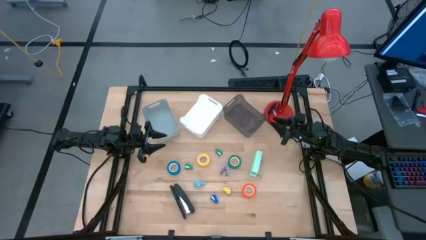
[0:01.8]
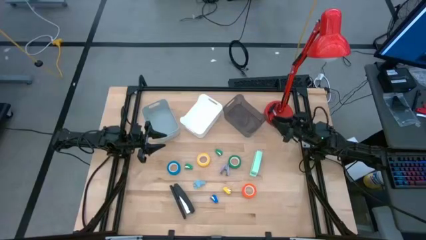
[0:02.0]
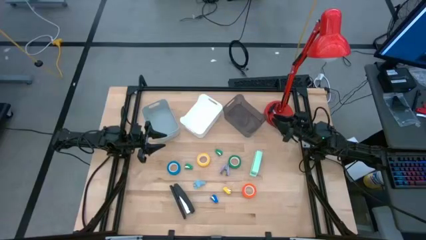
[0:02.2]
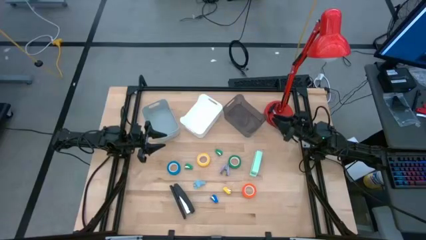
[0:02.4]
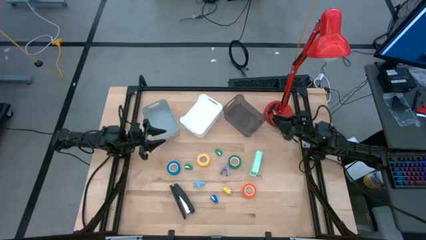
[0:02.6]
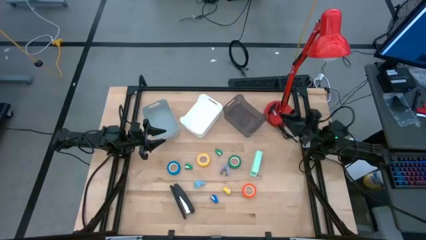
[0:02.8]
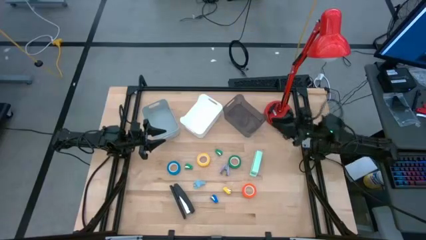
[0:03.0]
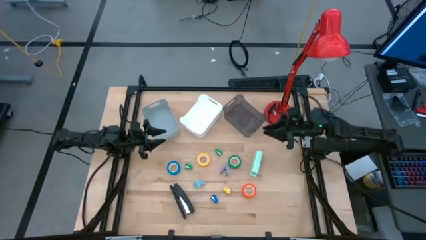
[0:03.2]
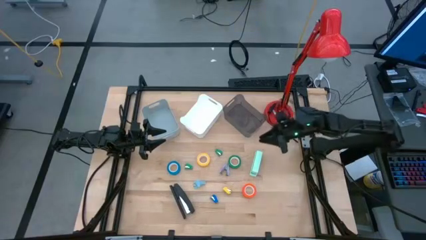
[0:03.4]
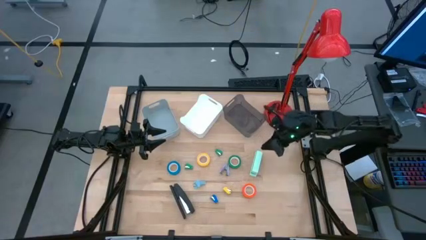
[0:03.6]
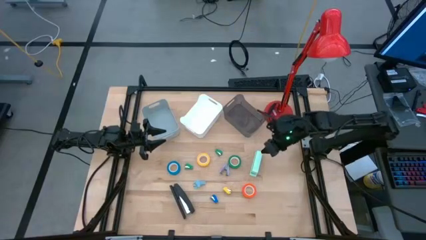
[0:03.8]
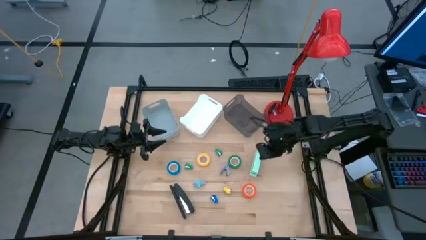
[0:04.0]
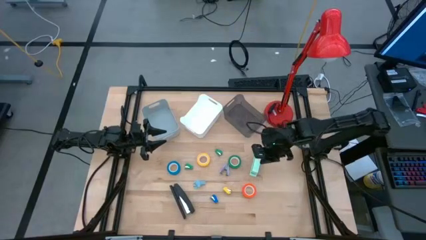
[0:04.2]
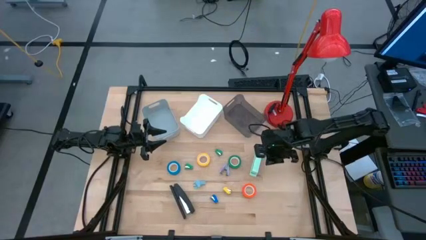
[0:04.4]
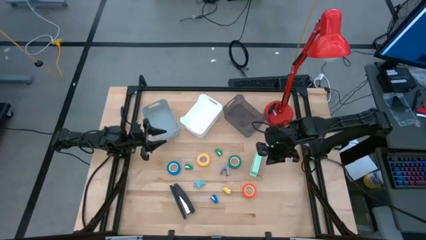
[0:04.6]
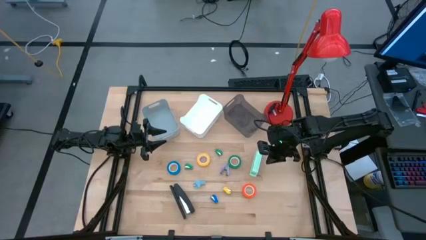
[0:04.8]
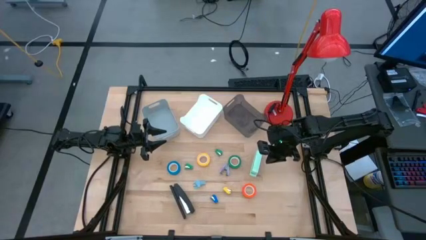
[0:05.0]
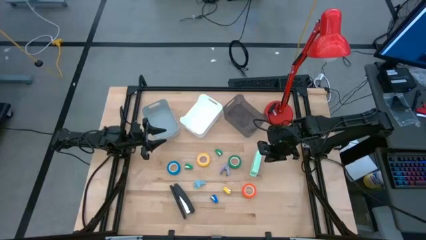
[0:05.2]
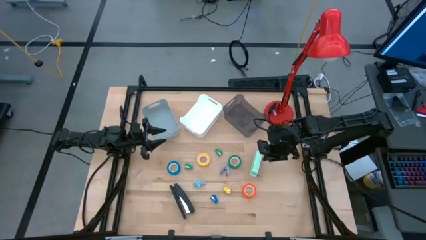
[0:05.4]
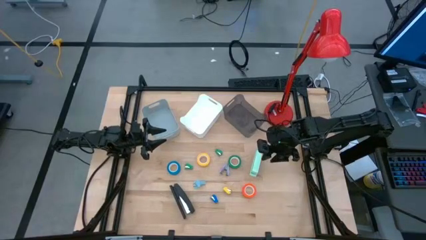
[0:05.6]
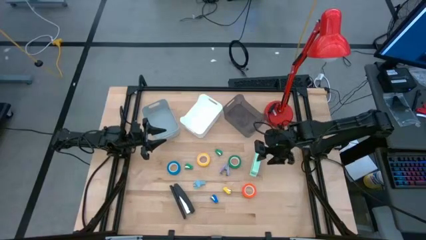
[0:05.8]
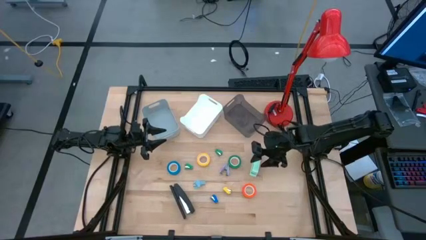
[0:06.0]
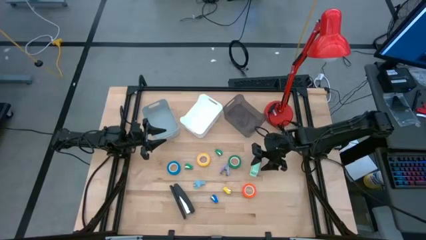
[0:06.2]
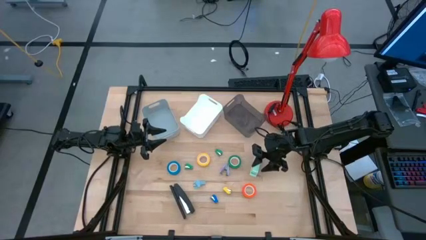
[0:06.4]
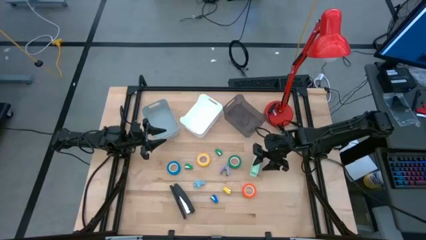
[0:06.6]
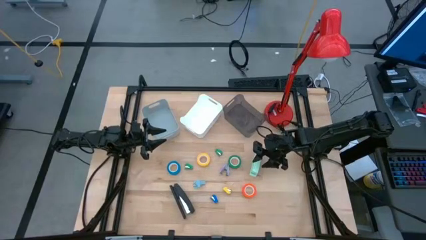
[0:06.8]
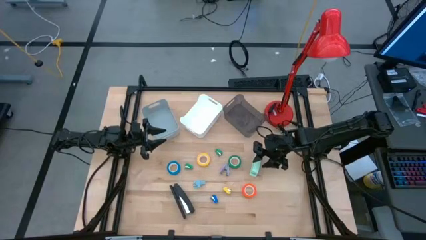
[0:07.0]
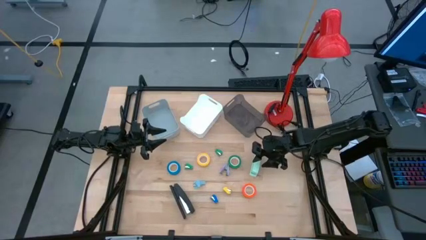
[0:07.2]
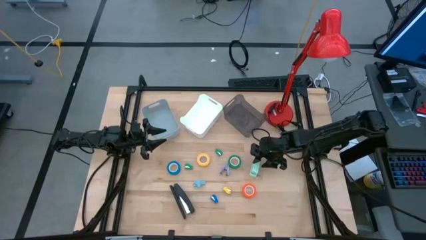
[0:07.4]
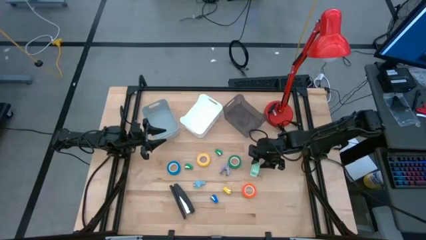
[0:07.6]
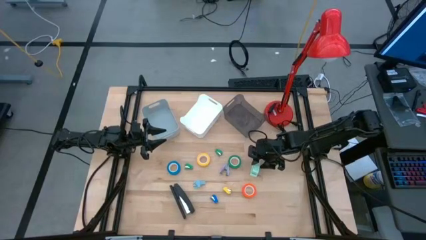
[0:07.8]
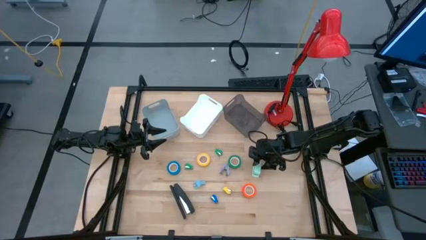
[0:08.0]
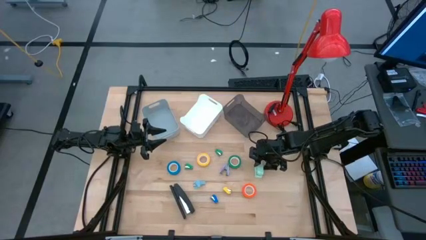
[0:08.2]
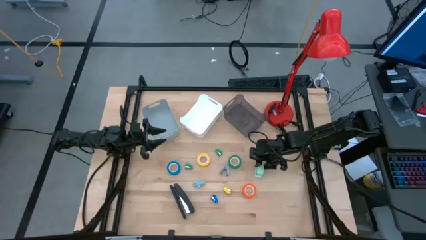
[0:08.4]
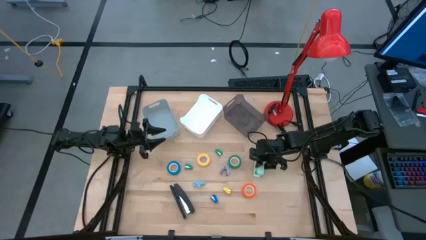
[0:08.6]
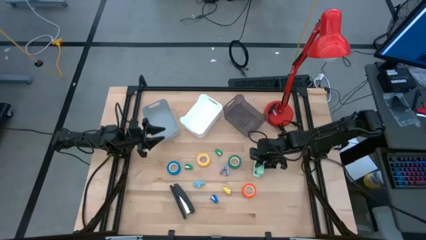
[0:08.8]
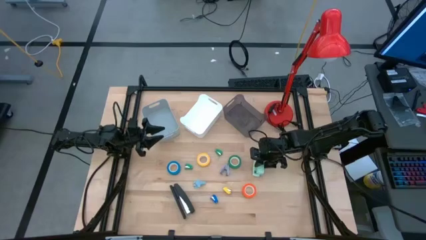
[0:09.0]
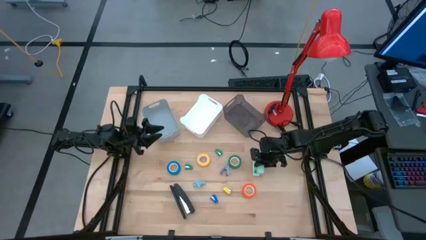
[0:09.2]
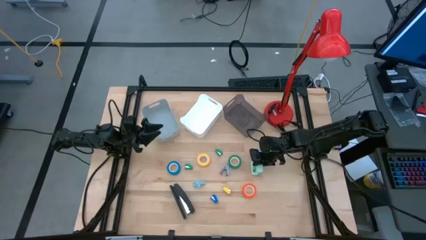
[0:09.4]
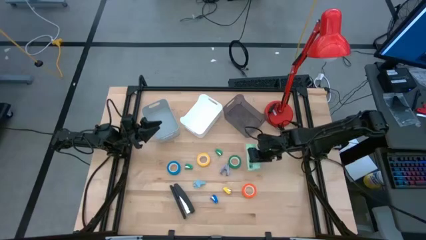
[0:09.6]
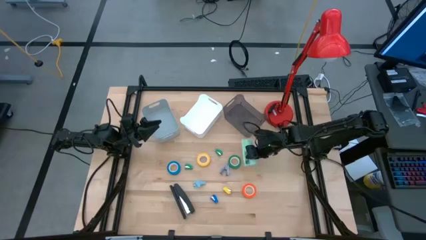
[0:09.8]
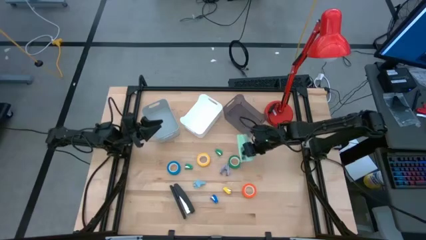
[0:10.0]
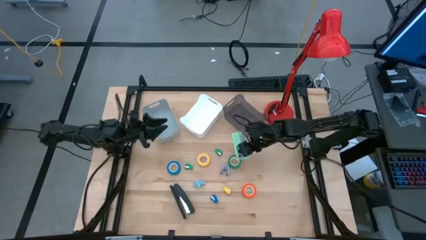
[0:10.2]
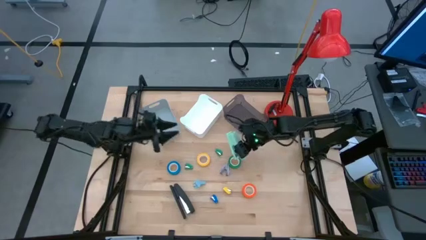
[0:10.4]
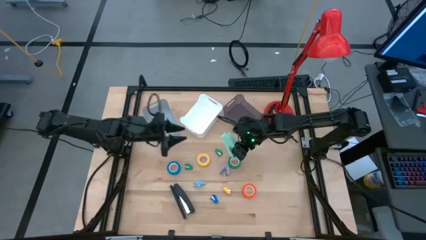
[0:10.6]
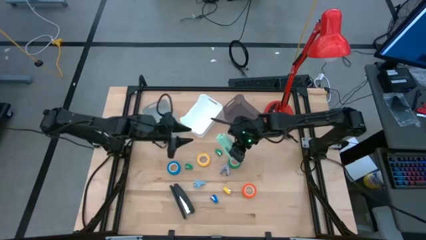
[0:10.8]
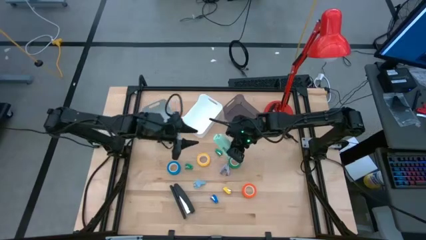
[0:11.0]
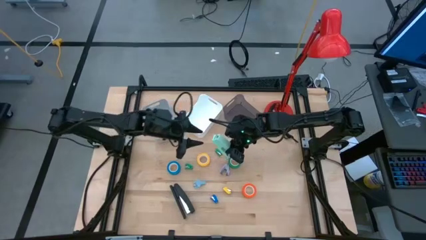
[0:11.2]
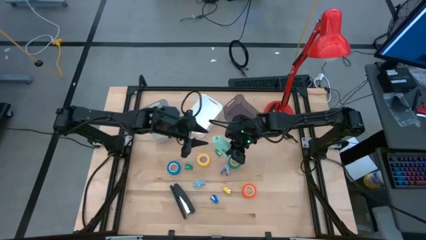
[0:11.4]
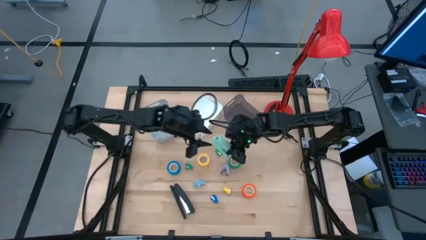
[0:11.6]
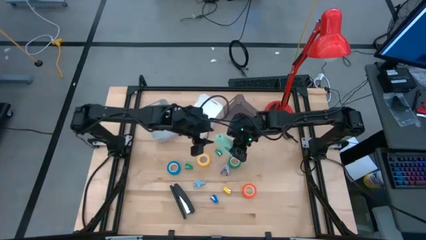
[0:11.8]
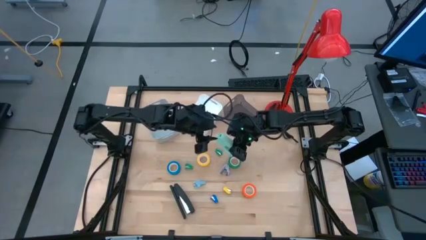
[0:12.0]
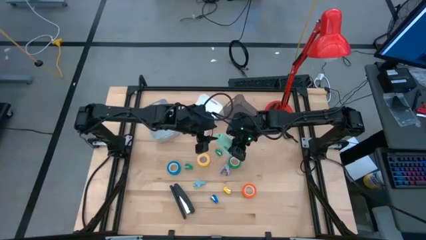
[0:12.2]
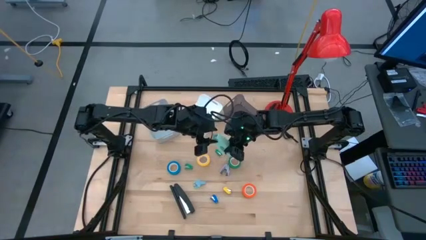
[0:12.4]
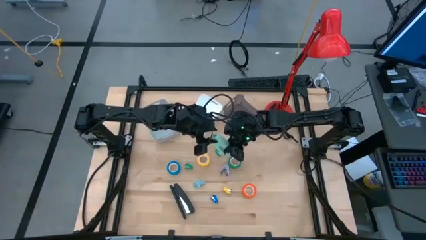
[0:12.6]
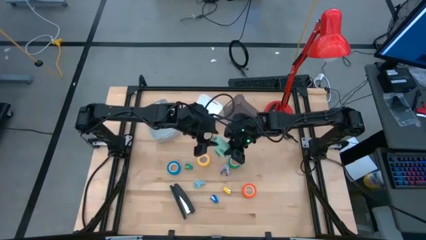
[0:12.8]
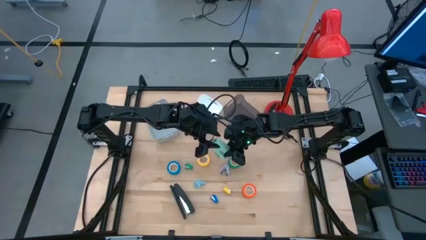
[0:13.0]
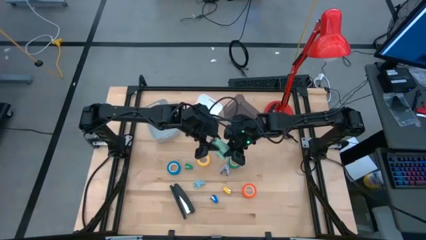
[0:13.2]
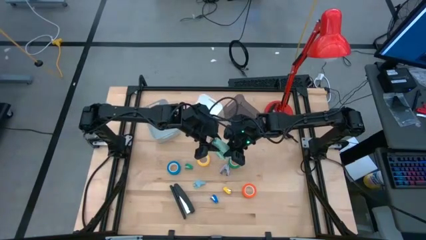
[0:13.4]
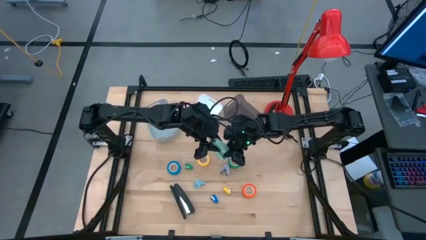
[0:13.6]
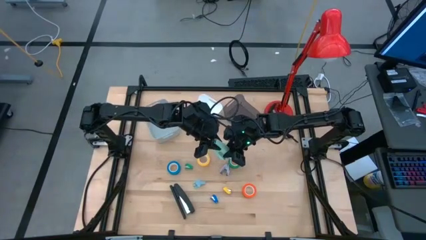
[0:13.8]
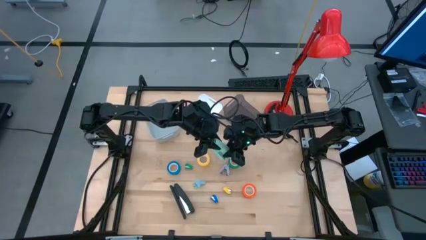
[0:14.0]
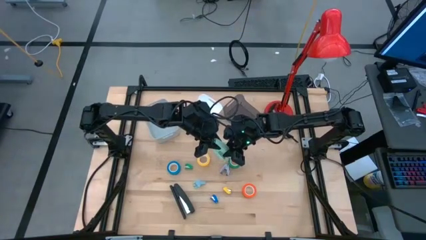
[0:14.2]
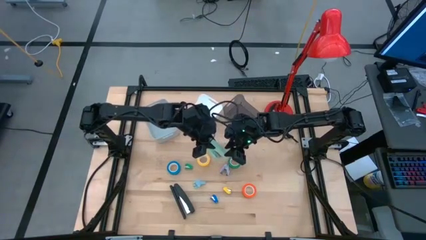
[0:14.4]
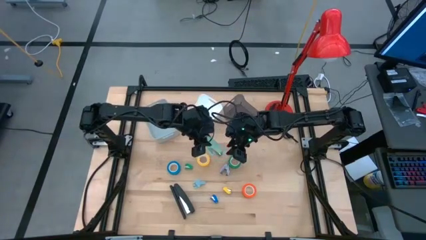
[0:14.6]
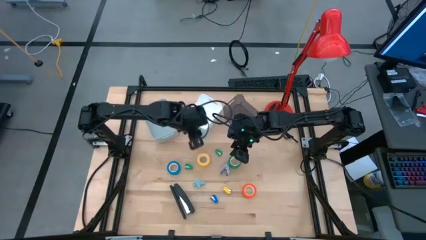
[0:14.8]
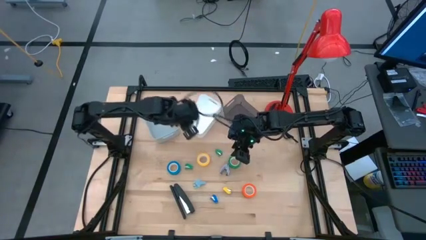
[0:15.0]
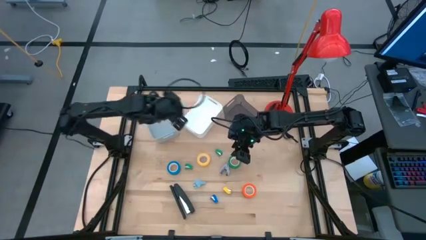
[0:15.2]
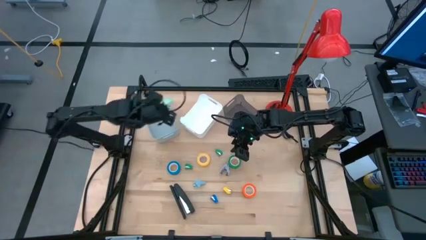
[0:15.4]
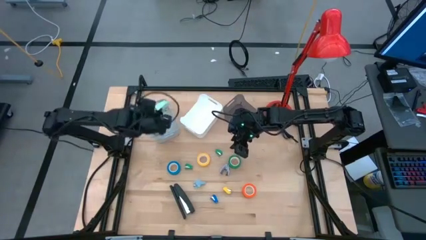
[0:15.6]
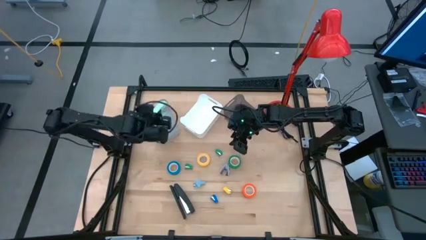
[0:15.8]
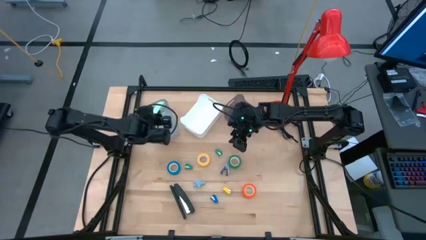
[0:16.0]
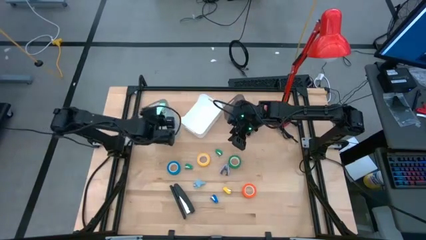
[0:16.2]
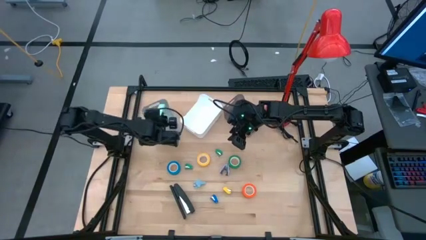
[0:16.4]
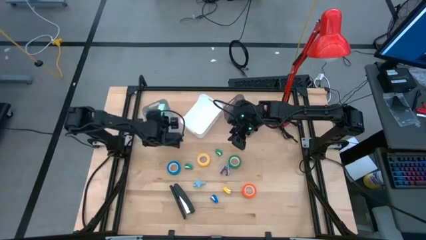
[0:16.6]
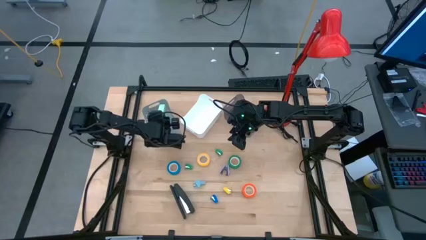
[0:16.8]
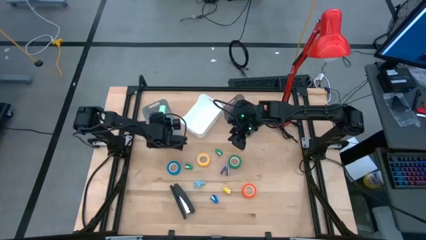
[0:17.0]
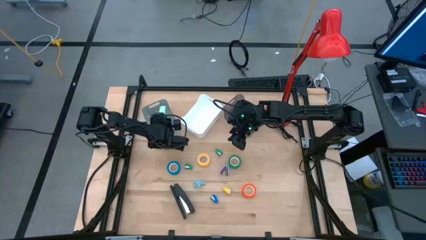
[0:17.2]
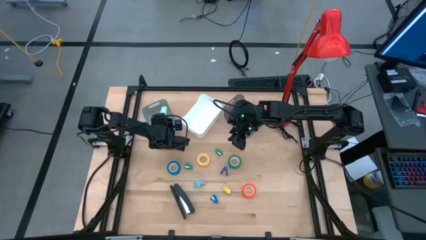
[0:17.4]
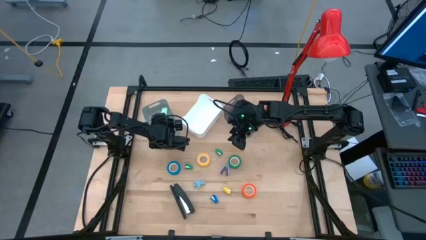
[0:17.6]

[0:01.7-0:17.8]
Task: Pick and place Stapler, Stapler remover, tape
Put the large light green stapler into the gray bin
